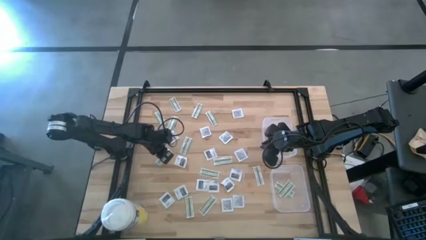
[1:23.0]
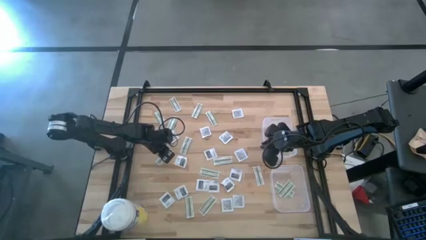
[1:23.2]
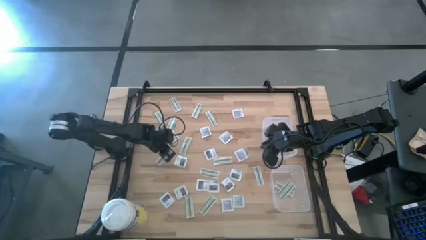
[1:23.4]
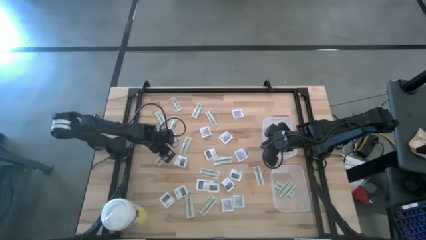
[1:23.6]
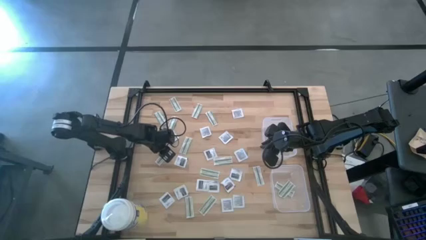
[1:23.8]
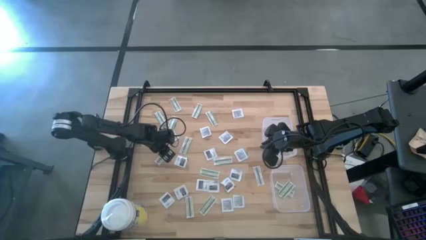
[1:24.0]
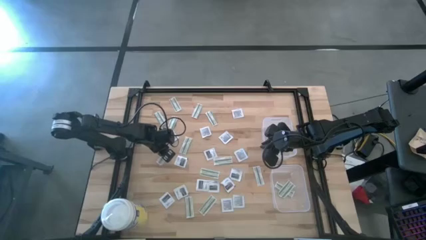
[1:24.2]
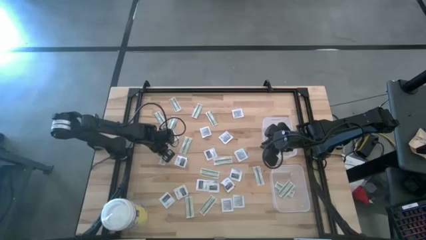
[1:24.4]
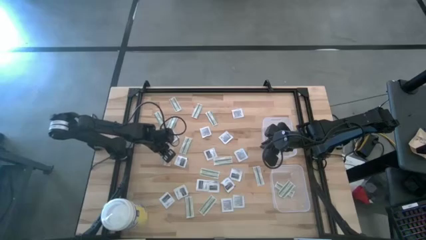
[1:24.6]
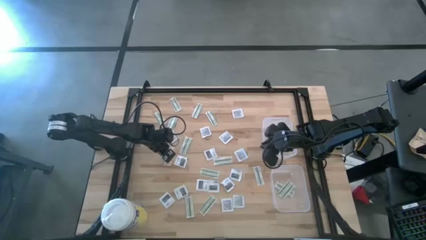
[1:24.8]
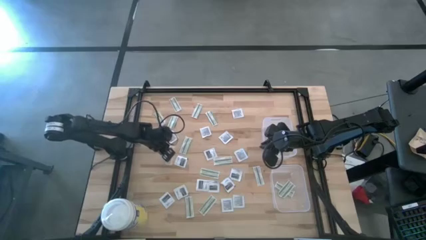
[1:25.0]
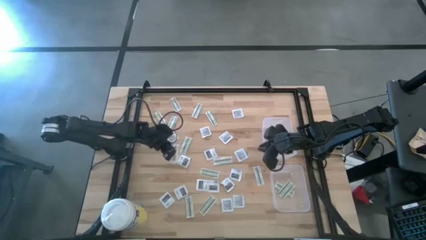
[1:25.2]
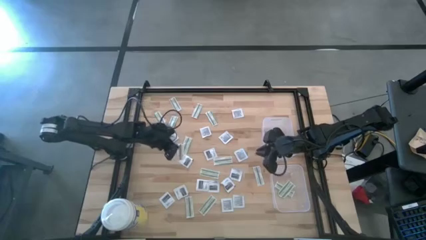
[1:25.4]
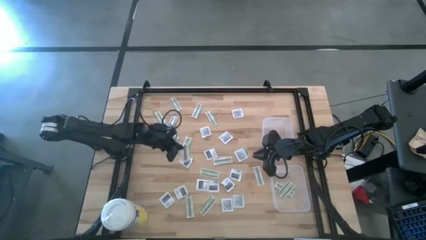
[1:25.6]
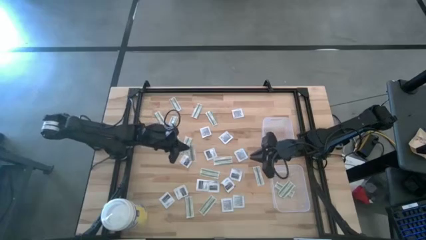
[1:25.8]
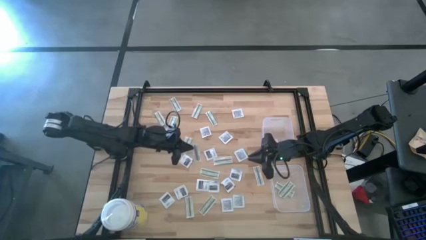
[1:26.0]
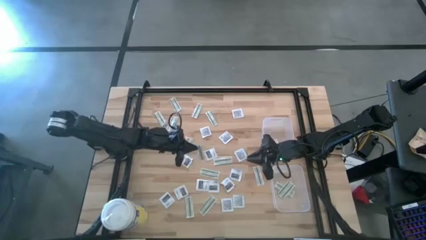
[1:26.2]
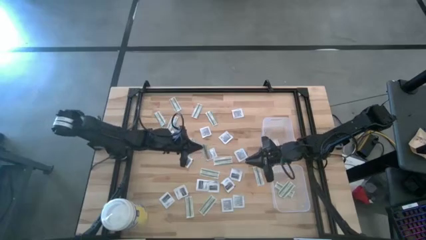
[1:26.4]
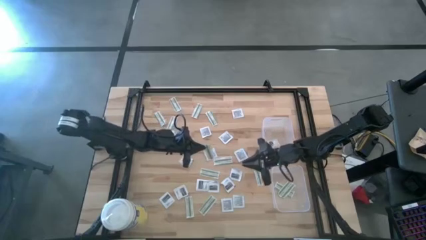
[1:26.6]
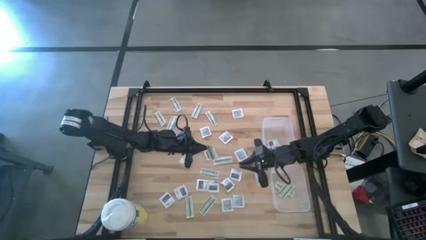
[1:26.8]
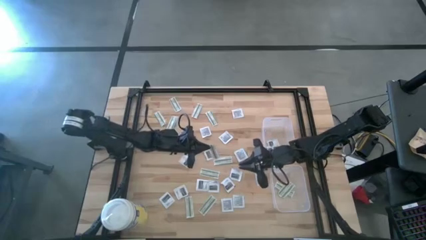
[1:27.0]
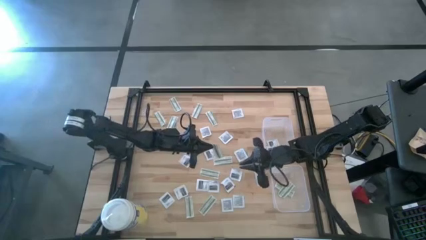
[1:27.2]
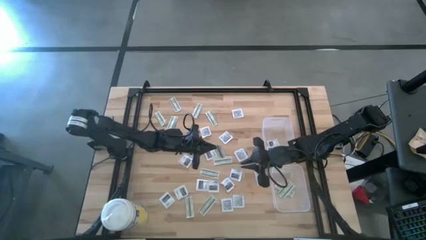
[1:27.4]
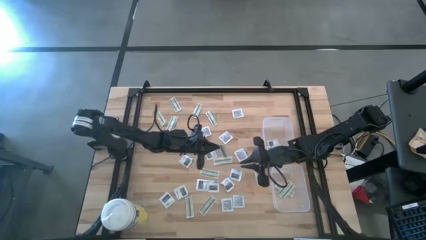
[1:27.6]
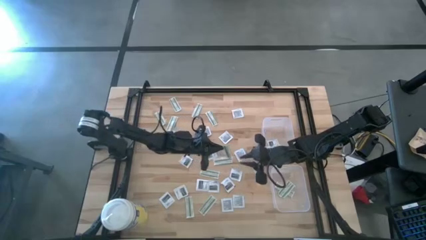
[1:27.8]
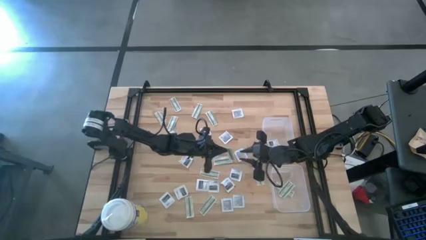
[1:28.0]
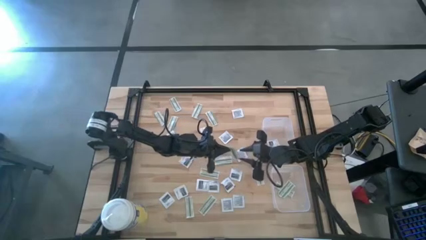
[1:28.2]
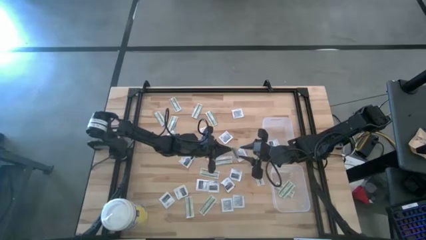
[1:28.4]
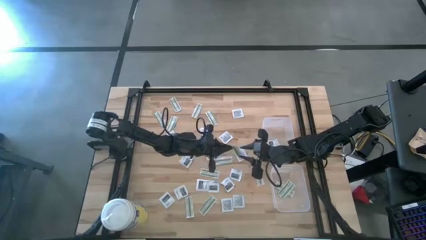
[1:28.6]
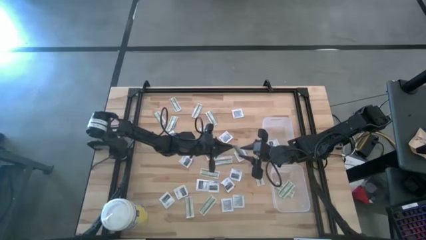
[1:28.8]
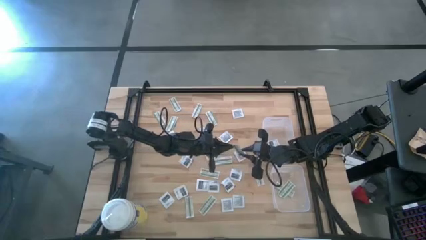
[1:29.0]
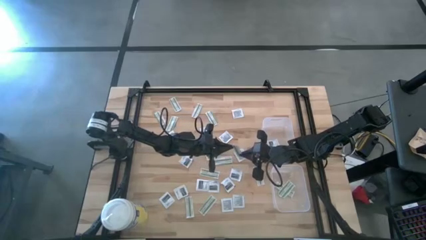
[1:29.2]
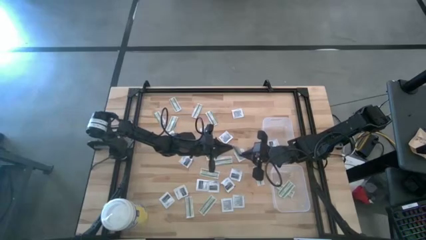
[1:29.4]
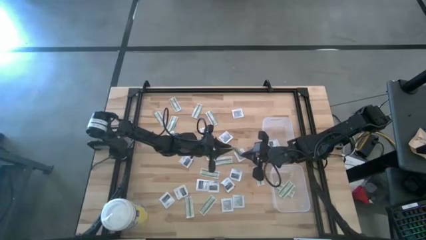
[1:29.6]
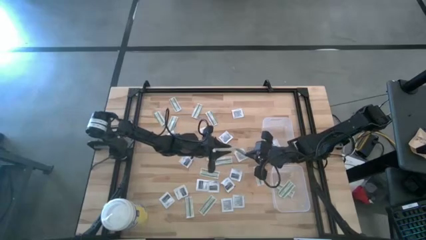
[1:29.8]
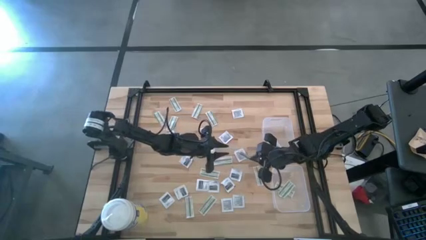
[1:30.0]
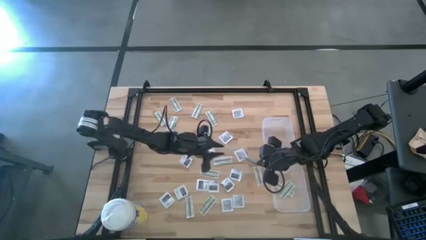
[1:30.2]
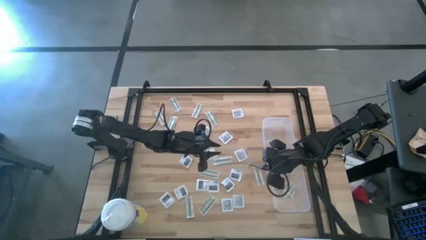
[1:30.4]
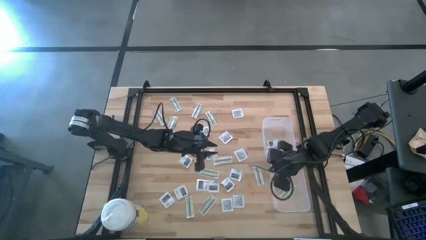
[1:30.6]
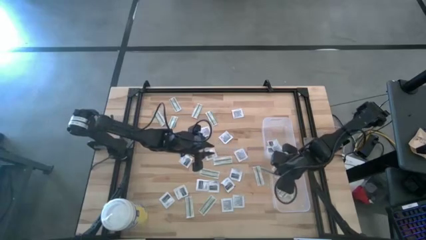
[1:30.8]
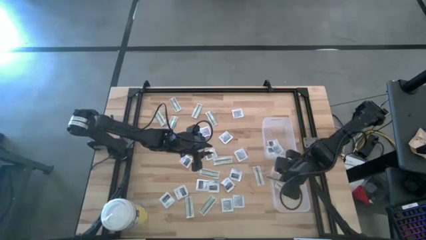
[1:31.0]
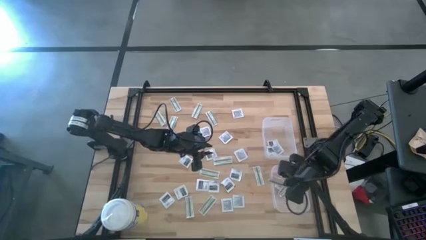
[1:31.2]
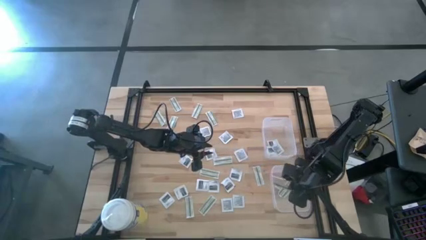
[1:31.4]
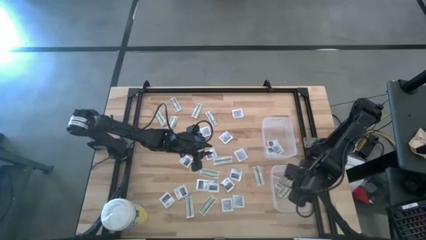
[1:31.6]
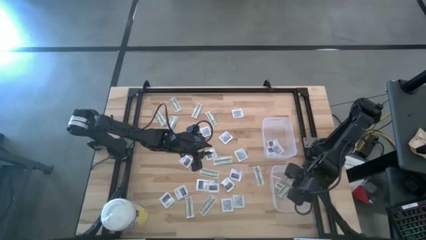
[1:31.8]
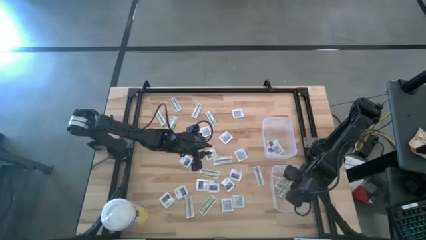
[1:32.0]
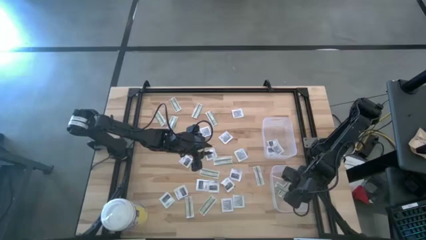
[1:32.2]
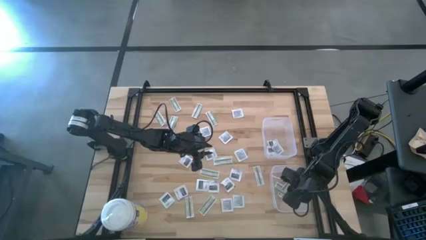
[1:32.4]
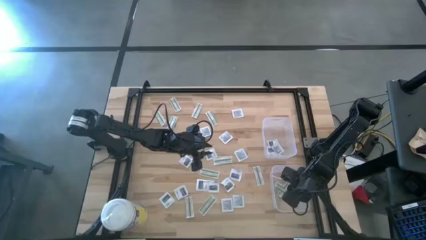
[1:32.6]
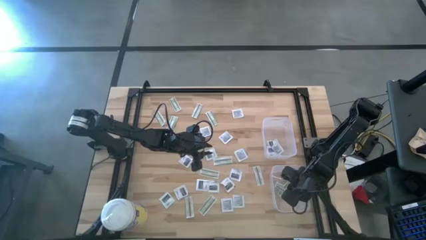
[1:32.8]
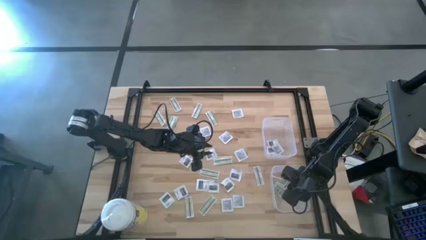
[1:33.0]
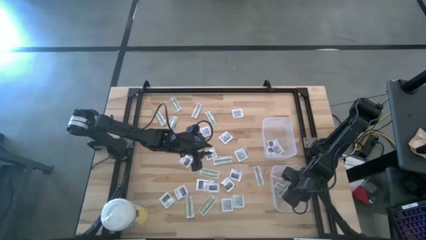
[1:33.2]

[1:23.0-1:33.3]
Task: Pick & Place First Aid Supplies
Put the bandage pack into the bottom bin

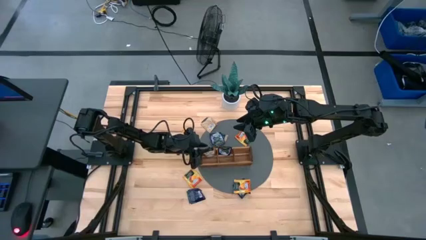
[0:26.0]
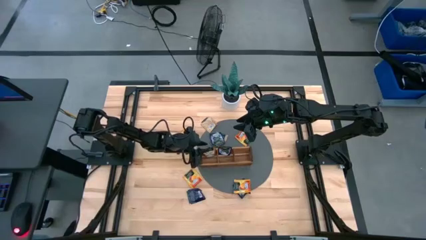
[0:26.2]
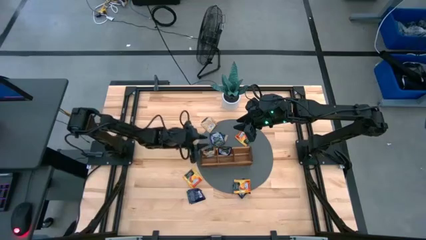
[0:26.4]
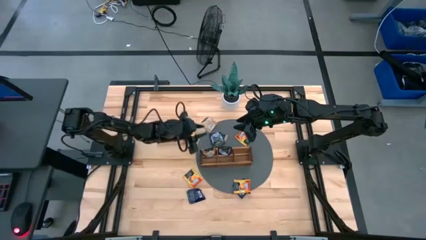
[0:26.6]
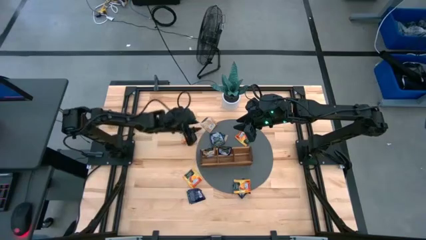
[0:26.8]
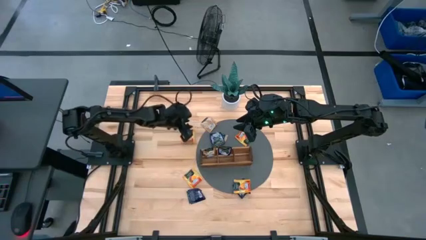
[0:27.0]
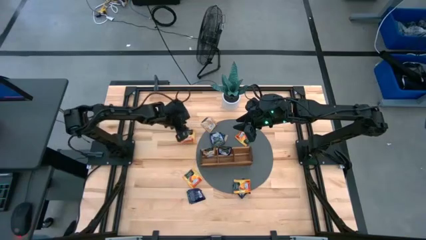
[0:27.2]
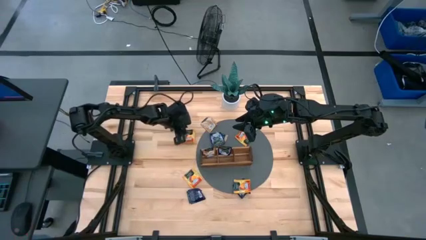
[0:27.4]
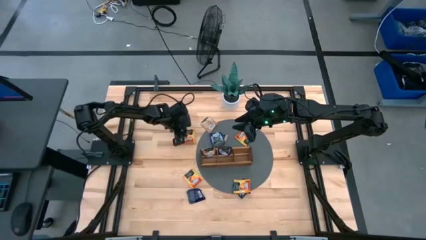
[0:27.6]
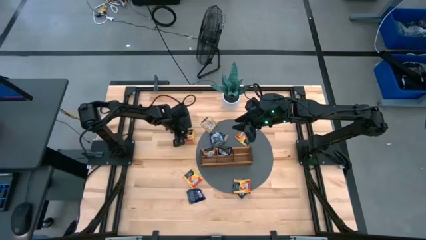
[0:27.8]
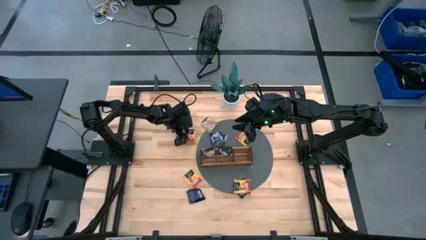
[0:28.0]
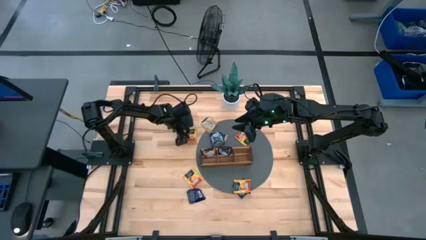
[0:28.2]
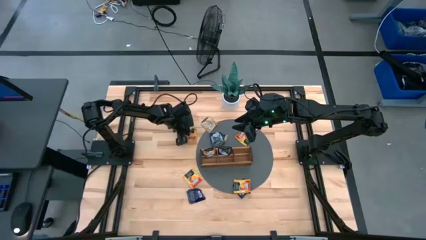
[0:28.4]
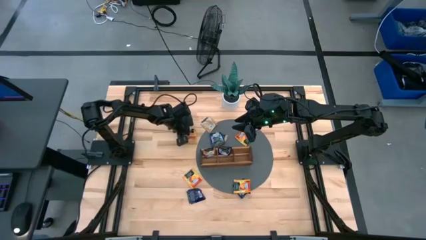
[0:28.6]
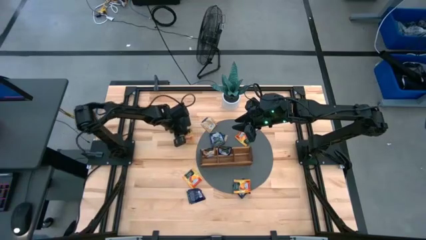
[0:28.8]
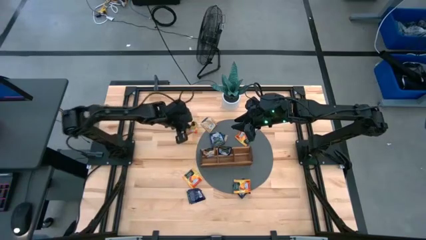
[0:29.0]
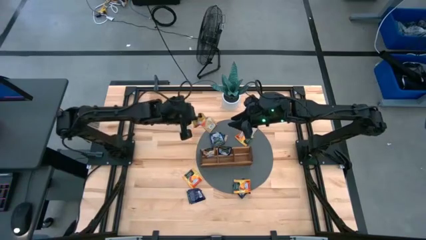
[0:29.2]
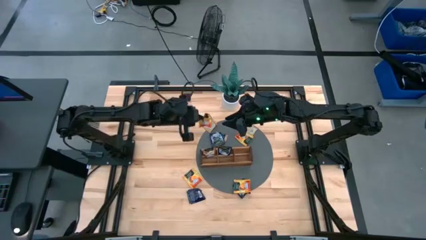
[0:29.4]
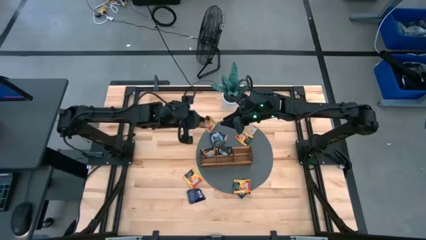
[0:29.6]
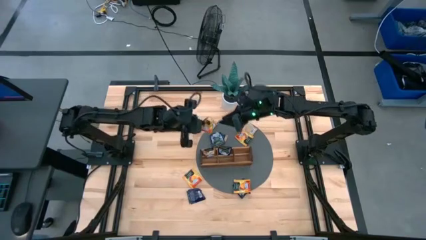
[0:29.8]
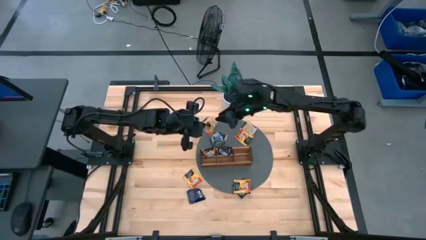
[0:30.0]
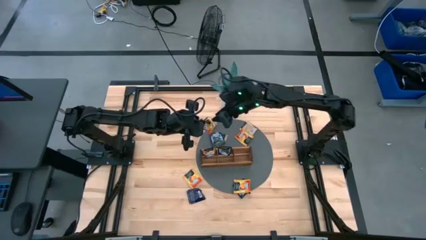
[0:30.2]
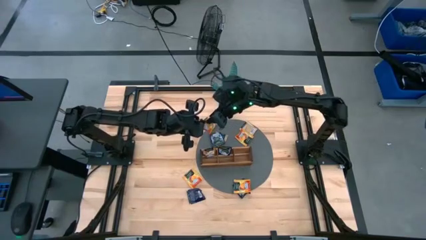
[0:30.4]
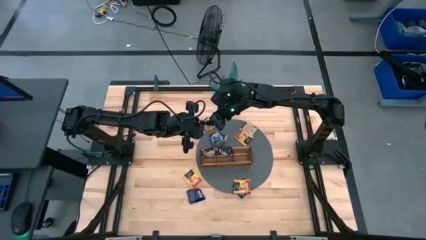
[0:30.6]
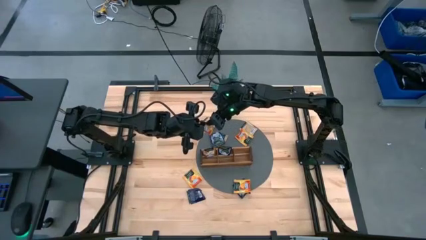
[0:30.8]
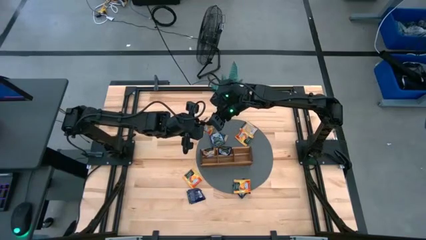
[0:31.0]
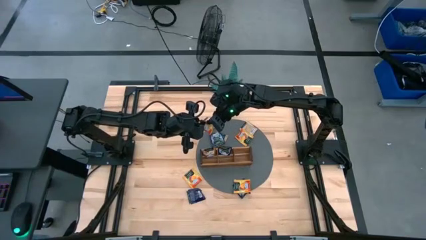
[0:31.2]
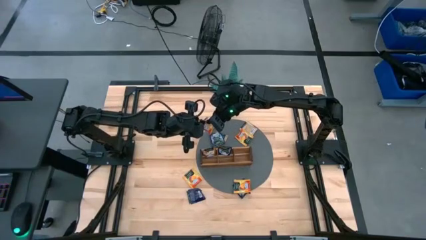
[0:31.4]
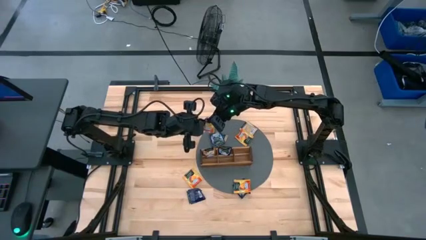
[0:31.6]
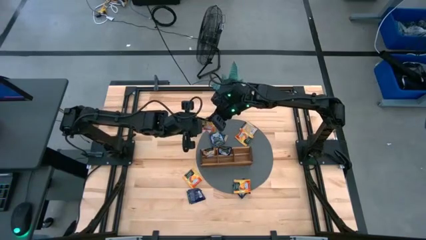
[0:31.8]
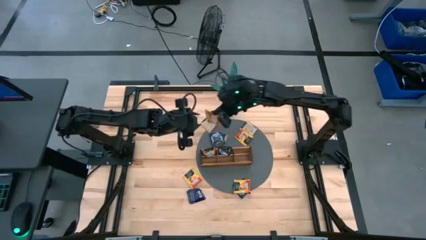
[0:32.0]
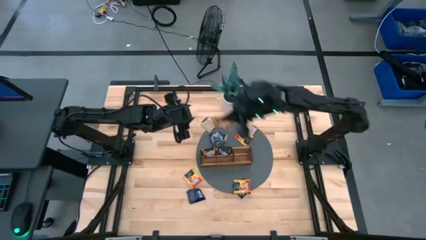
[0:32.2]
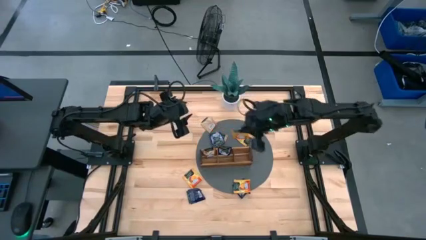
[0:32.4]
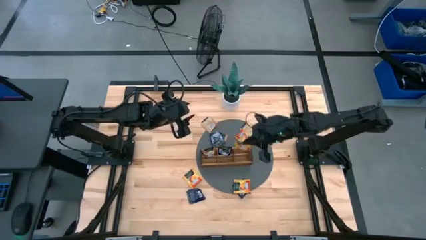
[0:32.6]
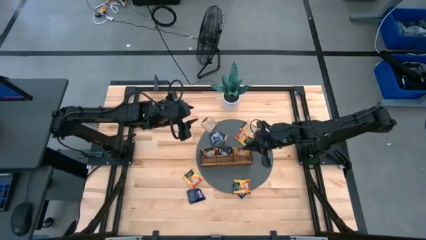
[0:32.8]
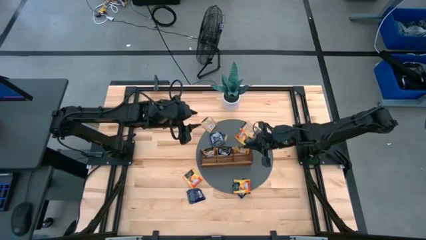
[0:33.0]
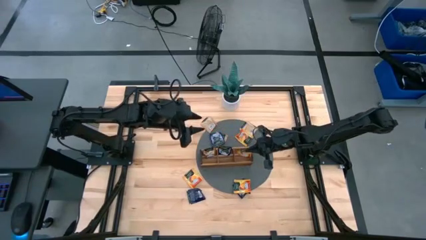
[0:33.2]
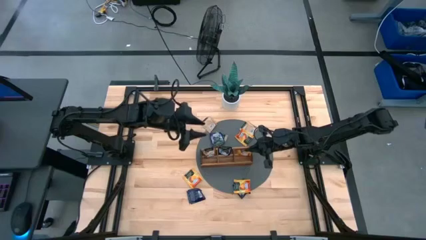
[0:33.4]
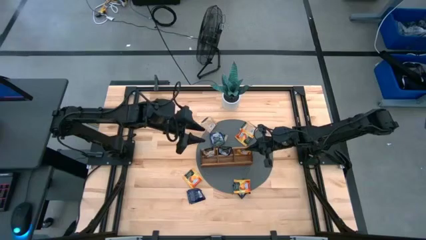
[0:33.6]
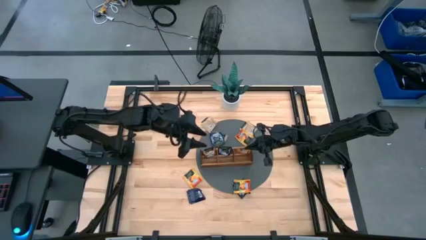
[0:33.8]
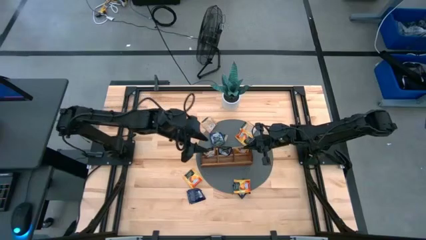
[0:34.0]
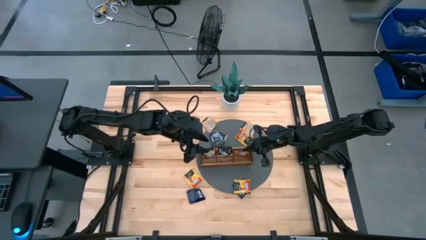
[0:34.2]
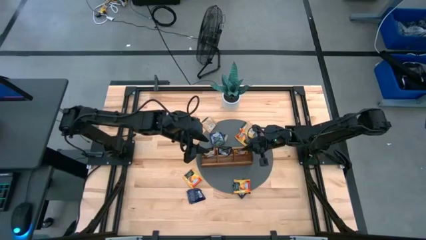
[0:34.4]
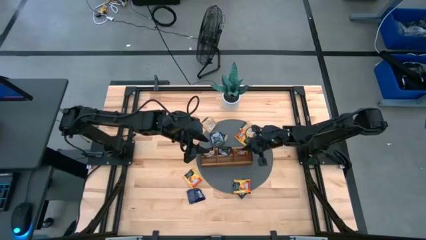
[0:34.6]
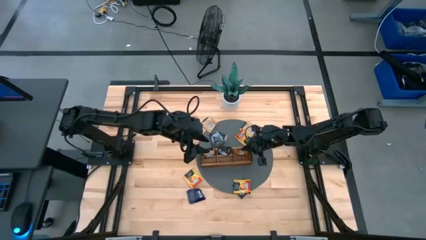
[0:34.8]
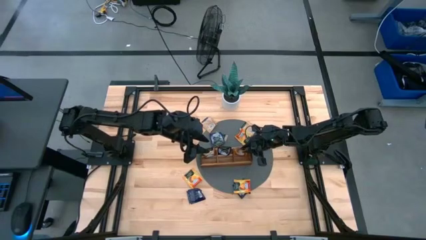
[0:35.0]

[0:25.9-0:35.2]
Task: Pick & Place Tea
Put the yellow tea bag into the right section of the wooden organizer
